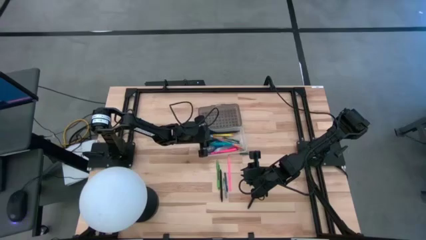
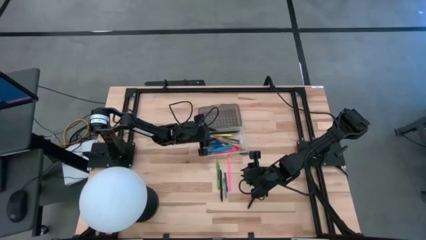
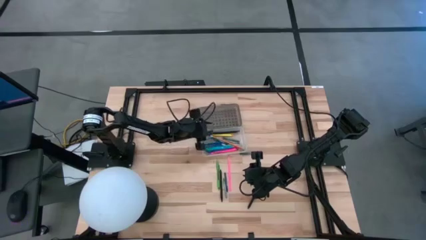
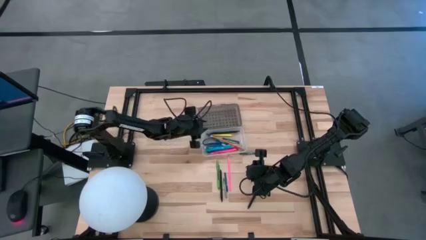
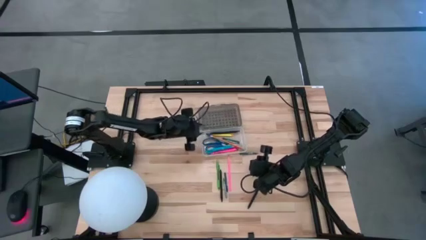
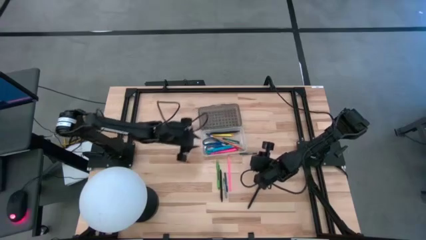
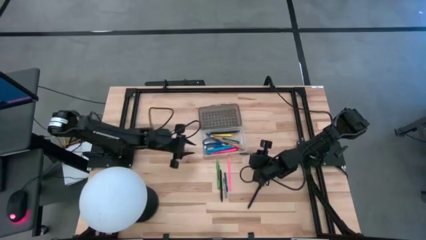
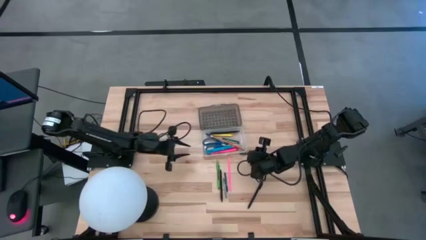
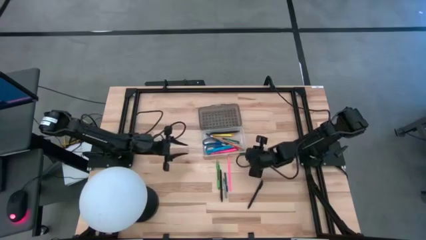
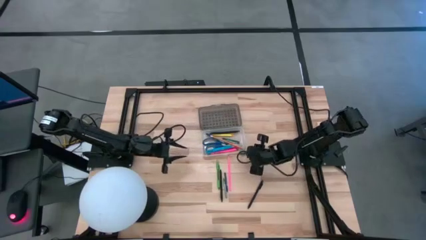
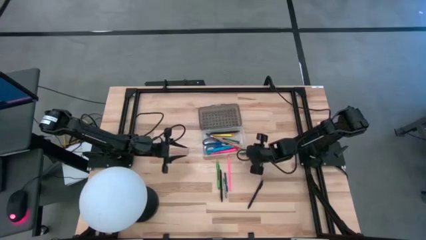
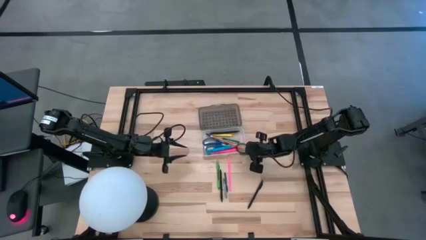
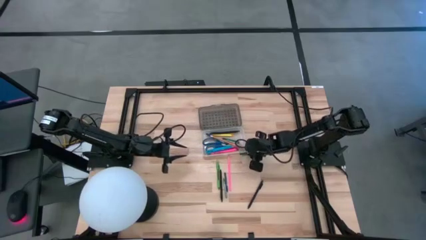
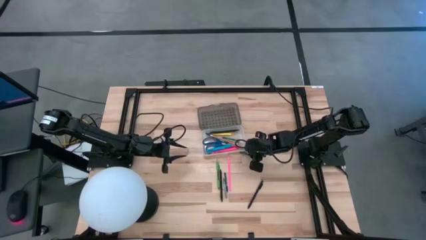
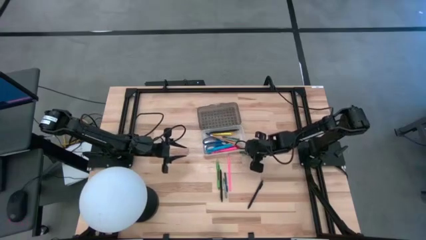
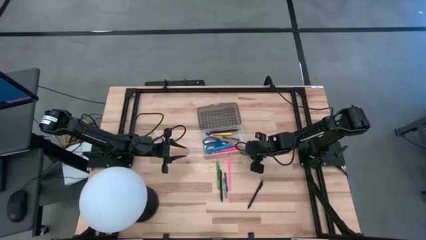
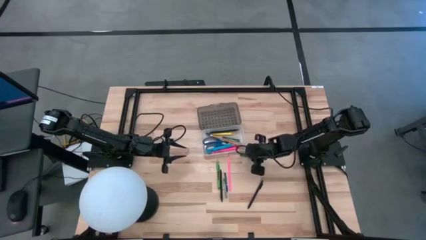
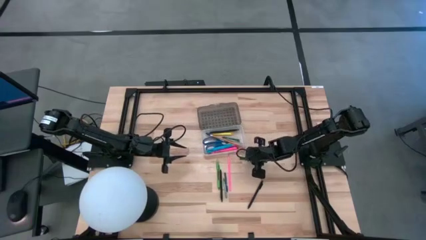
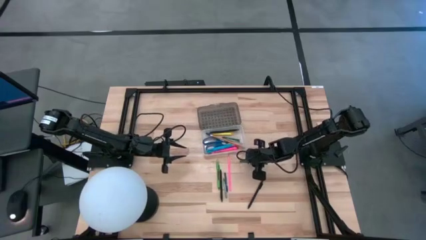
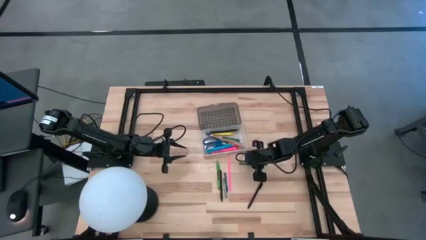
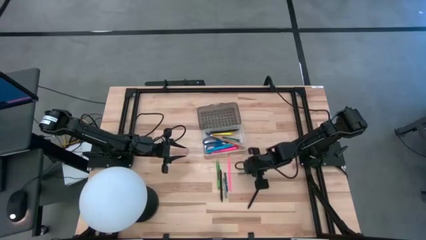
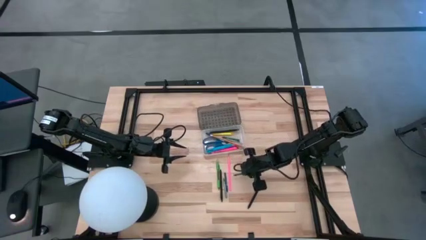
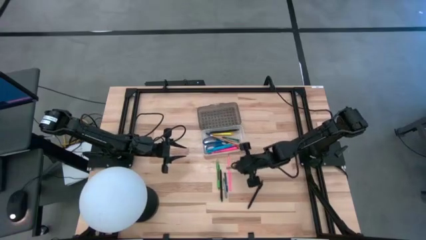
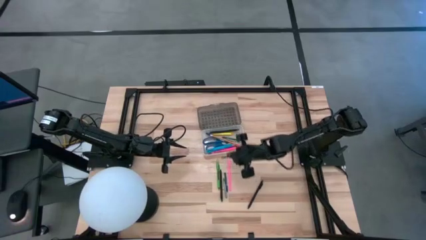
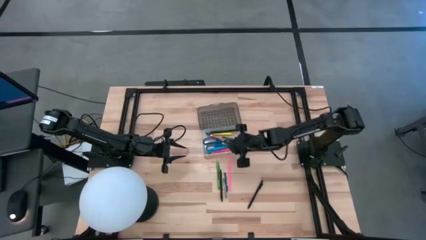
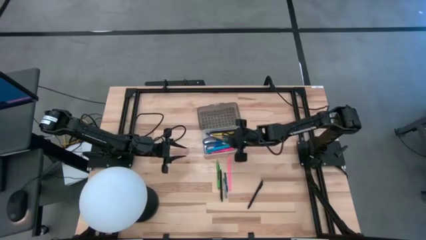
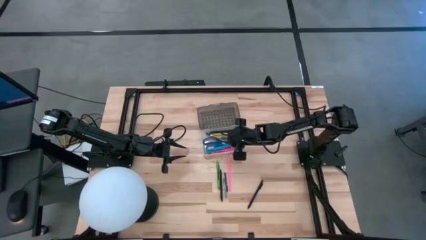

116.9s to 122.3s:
Task: Pick & place school supplies into a supply box
Put the green crayon into the supply box

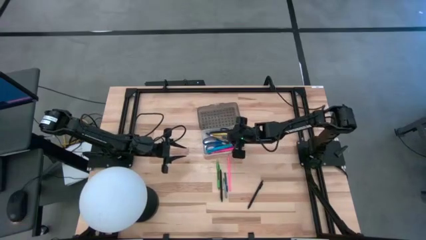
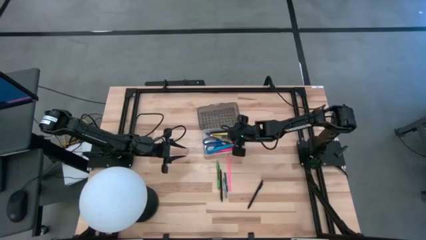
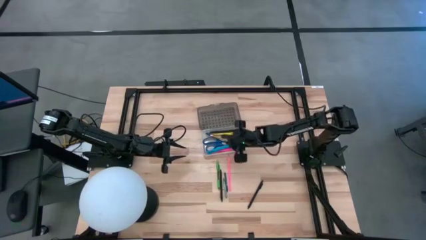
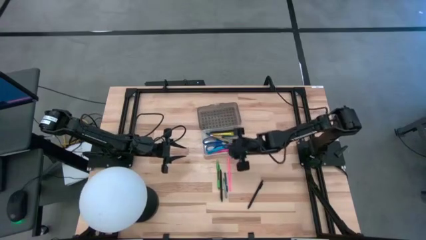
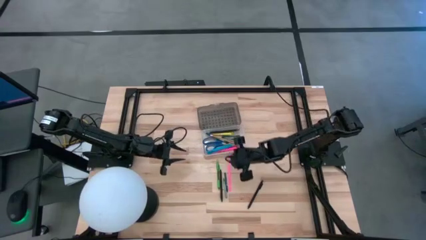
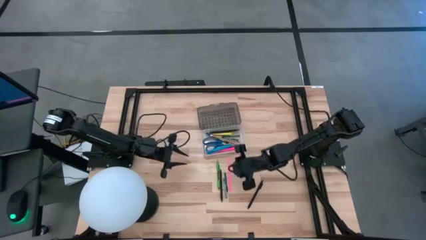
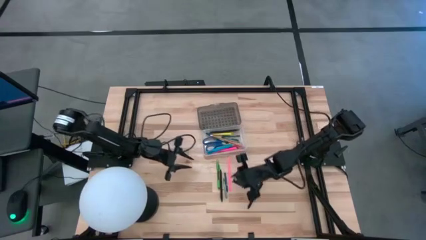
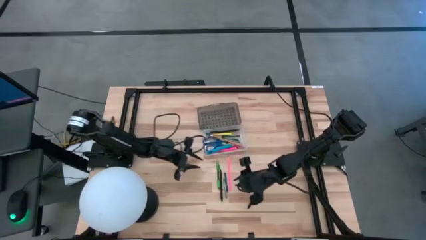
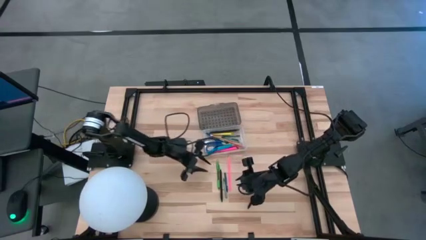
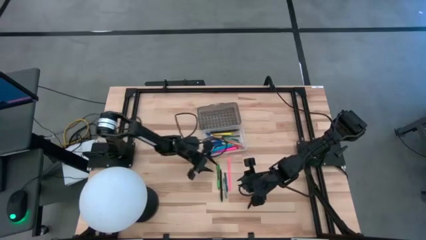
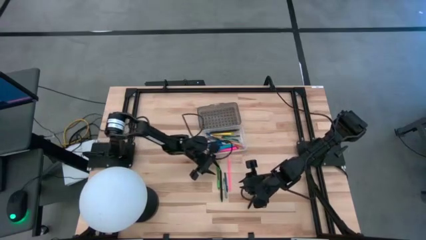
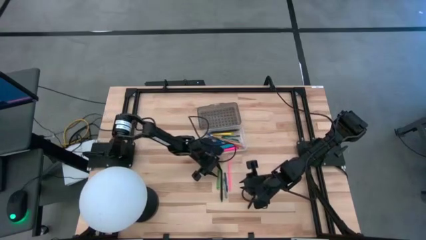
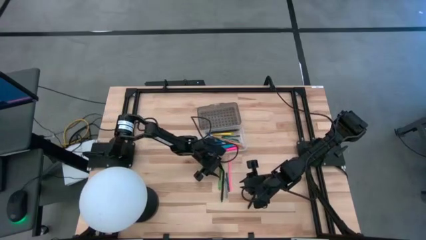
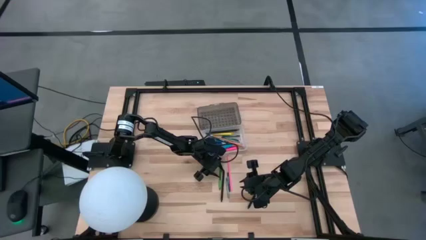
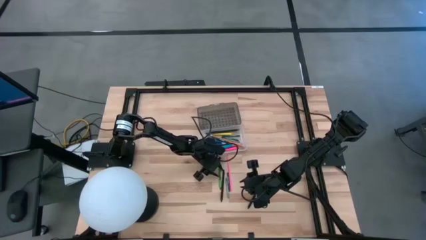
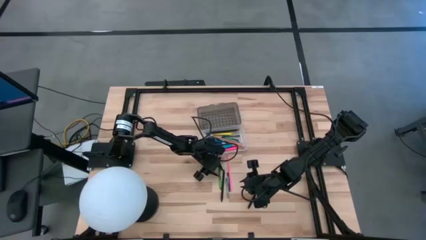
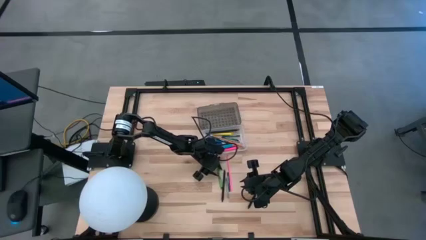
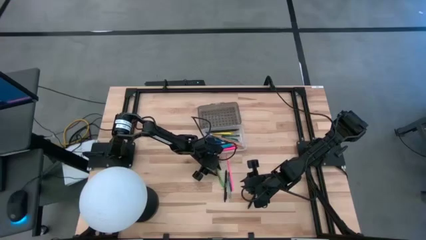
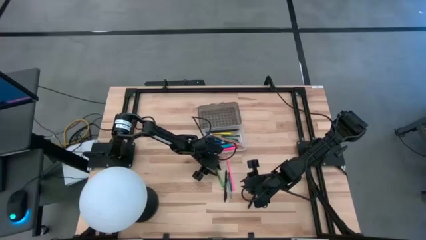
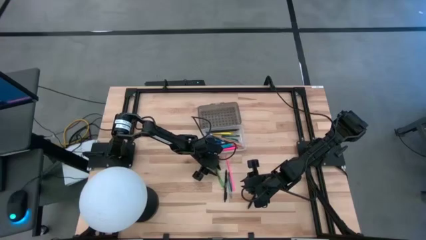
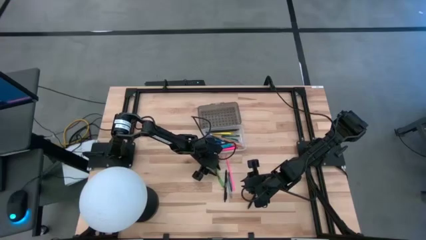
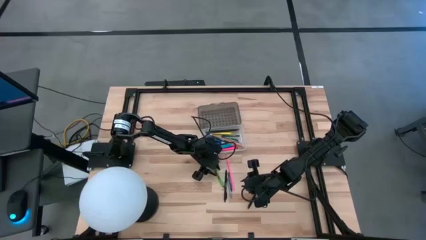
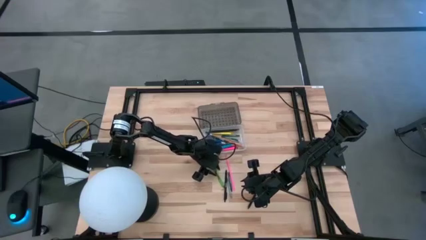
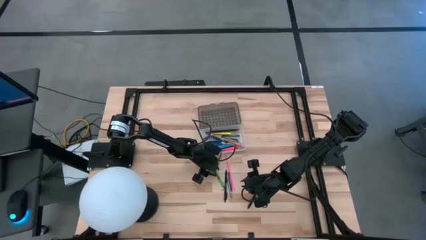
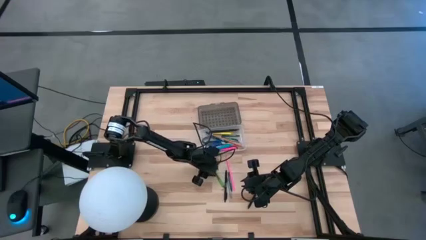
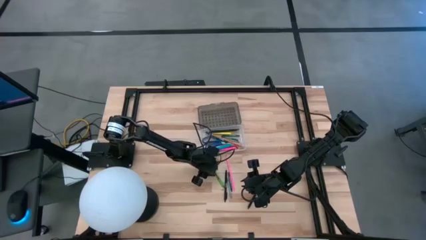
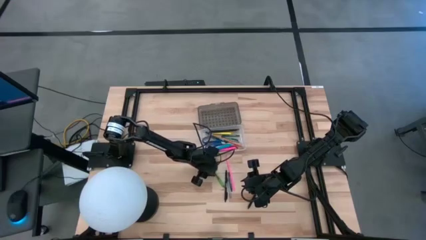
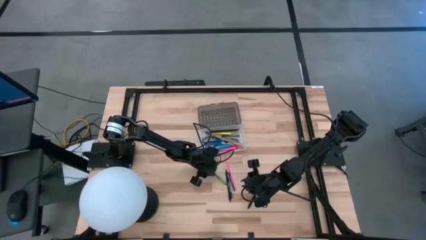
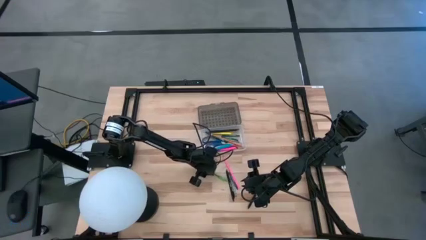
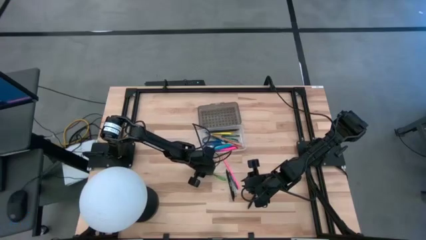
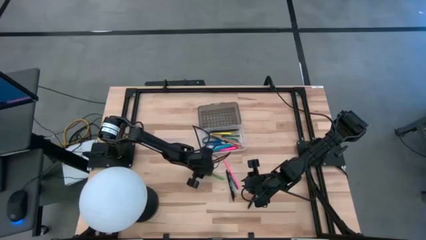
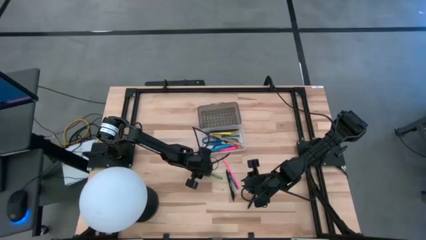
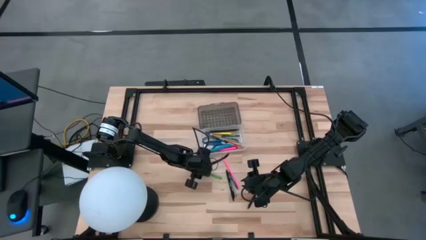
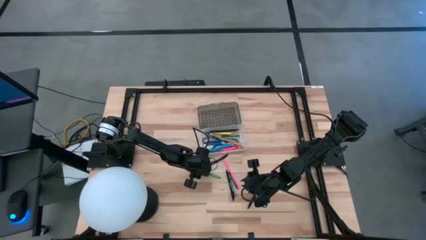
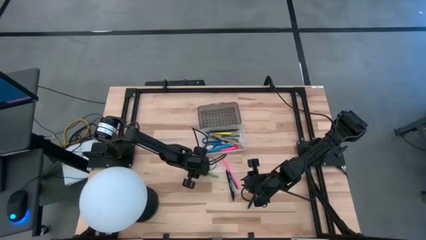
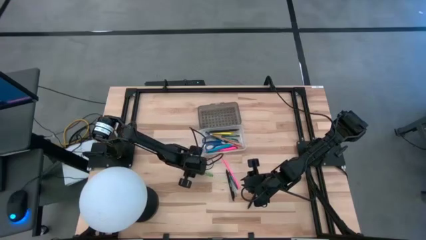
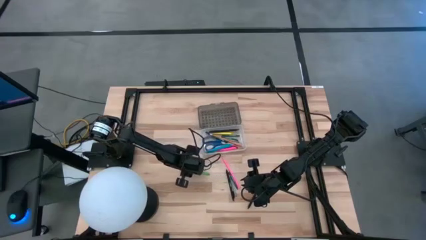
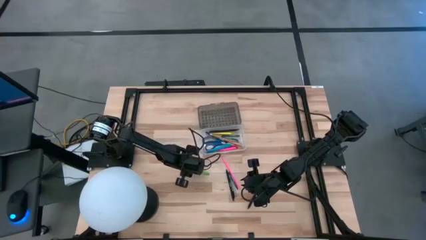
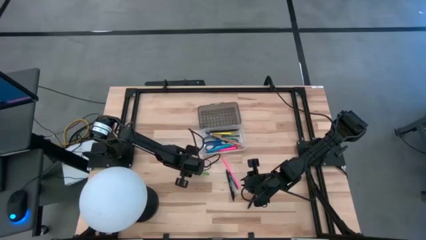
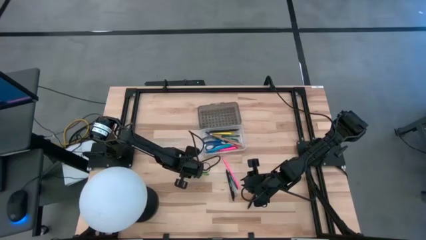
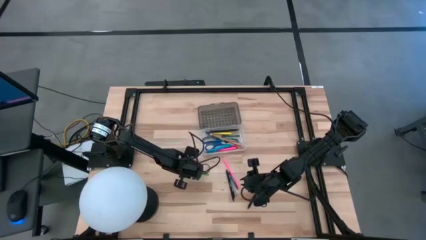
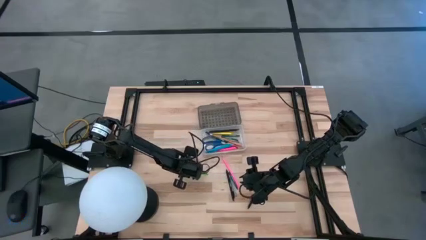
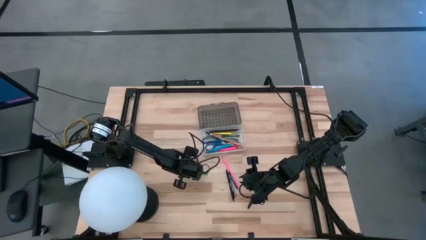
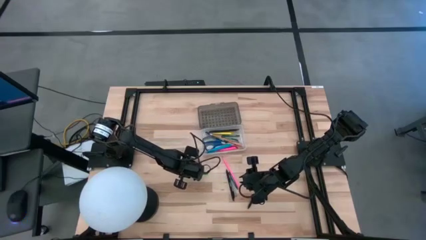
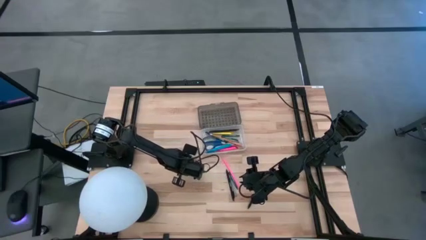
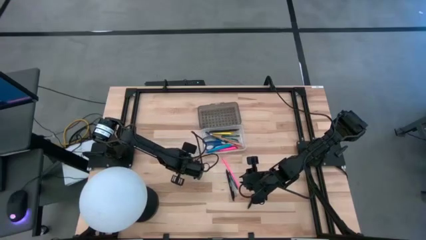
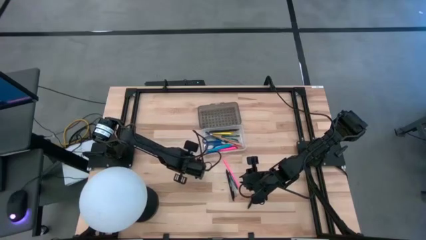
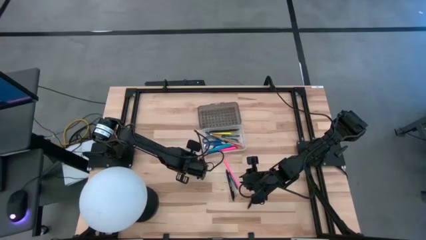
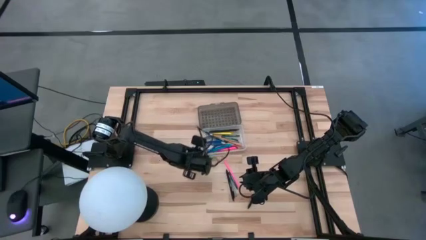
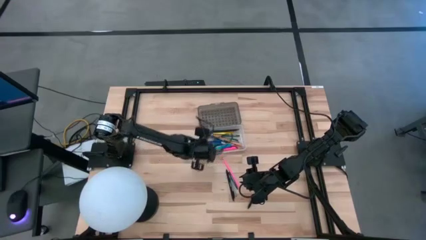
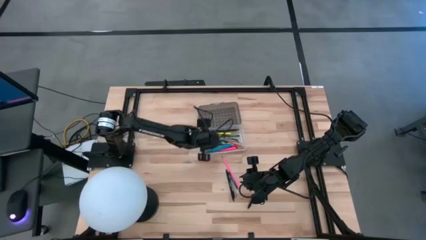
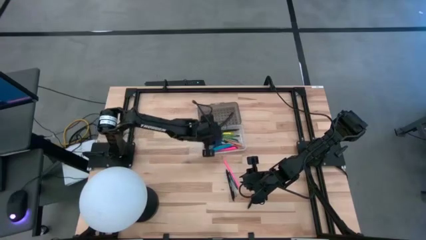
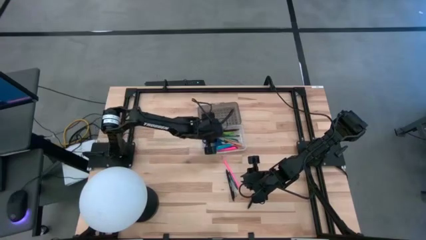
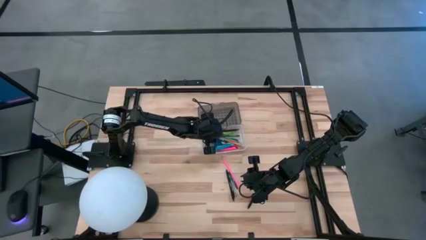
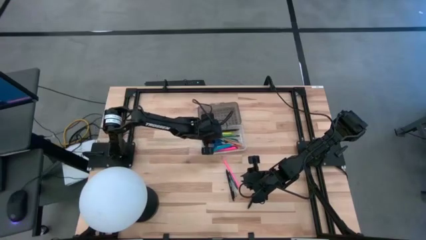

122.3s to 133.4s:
Put the light green pen into the supply box

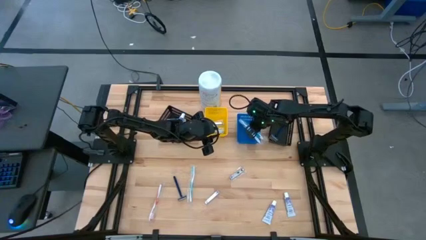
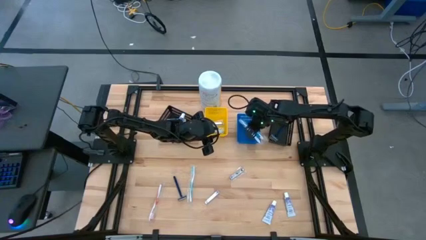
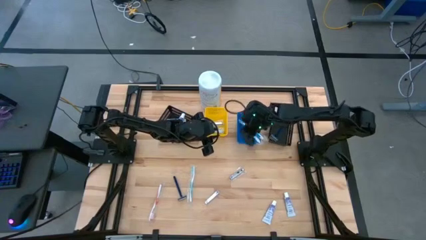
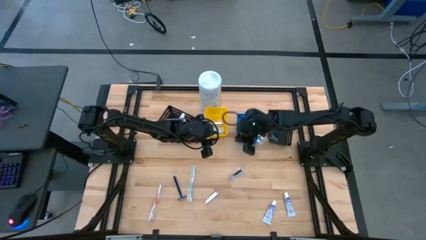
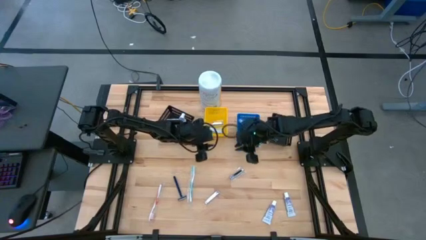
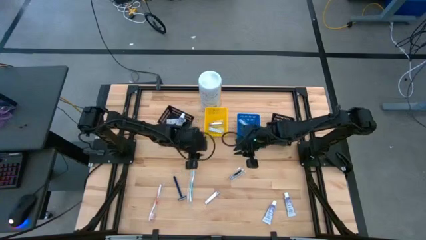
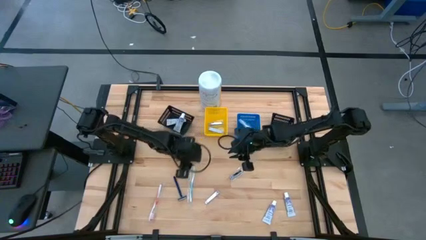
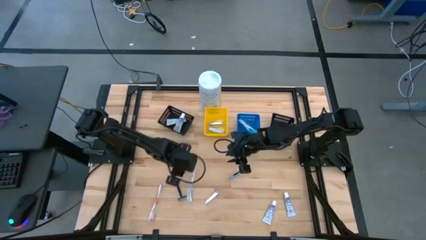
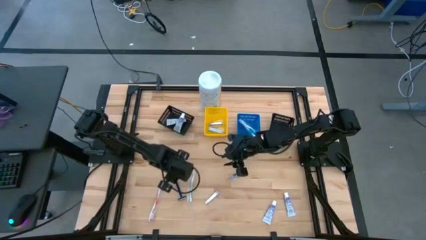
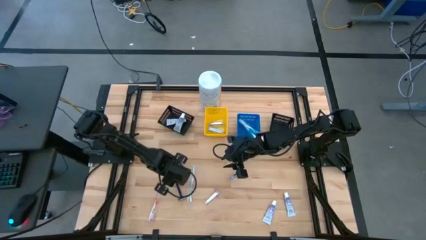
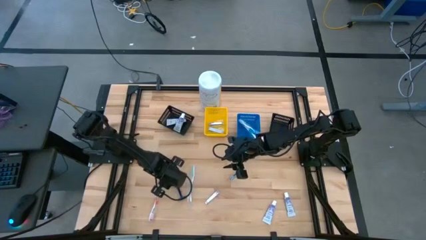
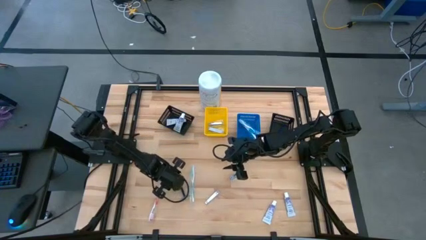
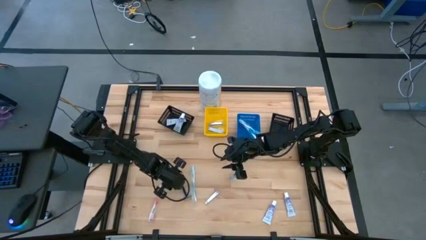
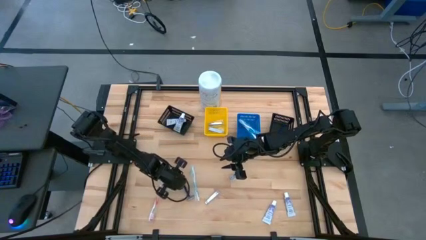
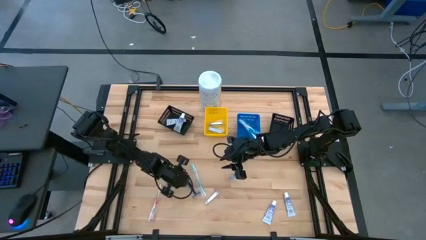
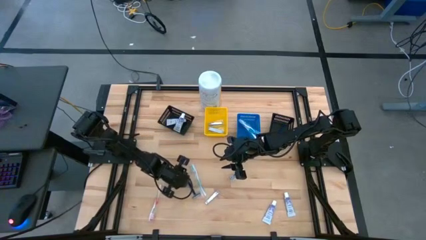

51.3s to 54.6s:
Task: Pick & Place Travel size toiletries
Put the blue razor into the right black bin
